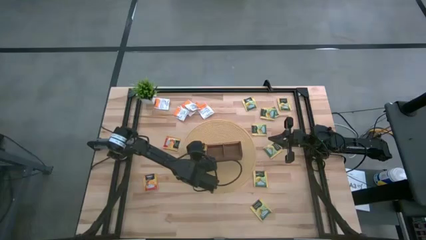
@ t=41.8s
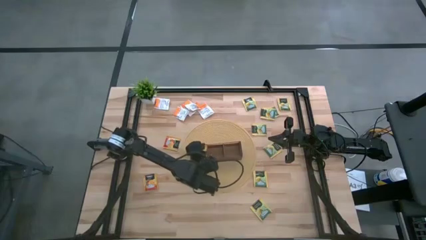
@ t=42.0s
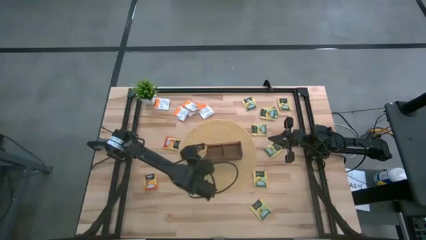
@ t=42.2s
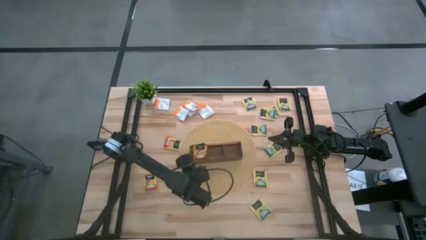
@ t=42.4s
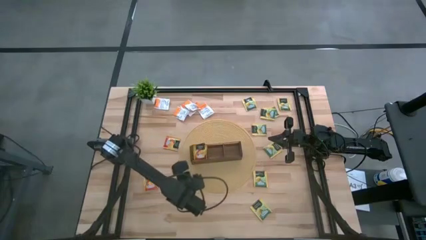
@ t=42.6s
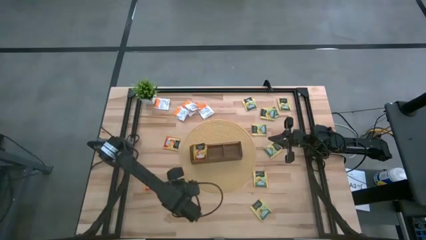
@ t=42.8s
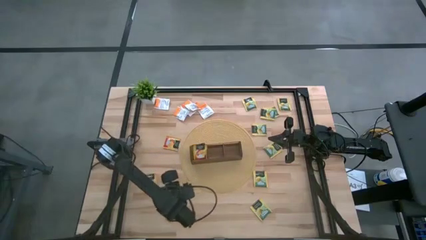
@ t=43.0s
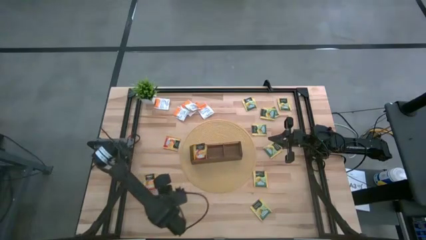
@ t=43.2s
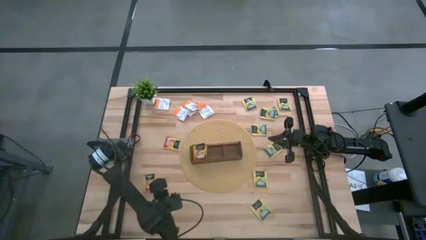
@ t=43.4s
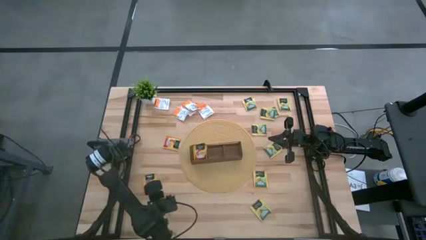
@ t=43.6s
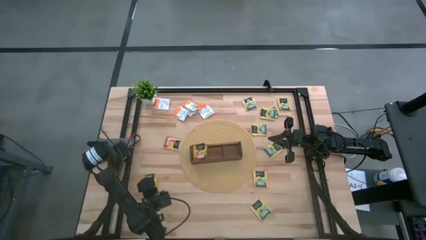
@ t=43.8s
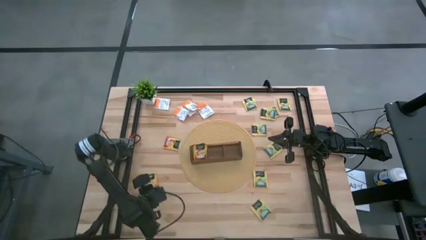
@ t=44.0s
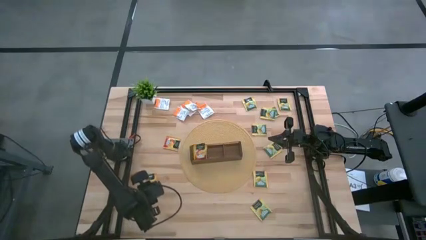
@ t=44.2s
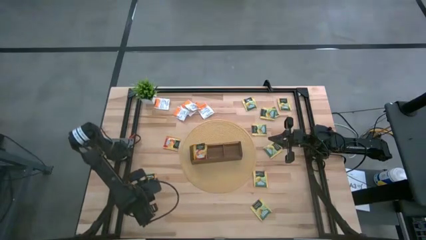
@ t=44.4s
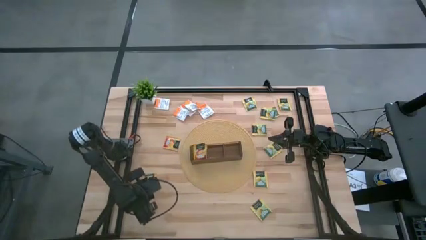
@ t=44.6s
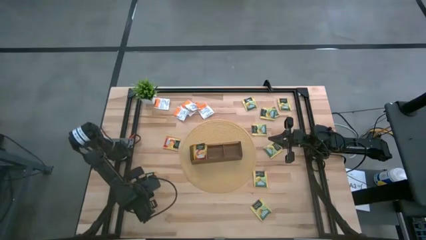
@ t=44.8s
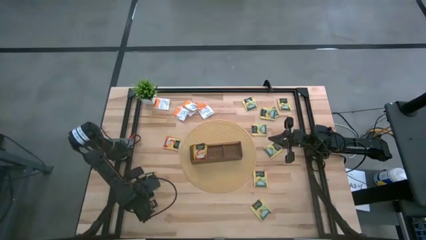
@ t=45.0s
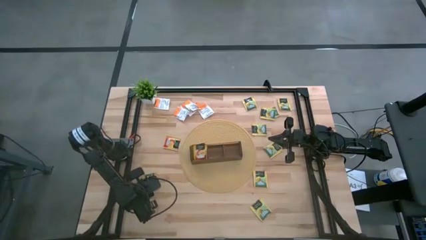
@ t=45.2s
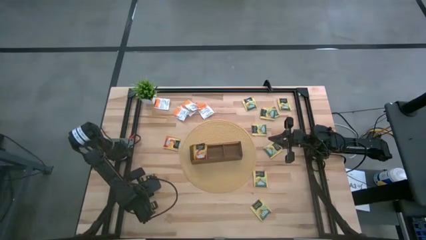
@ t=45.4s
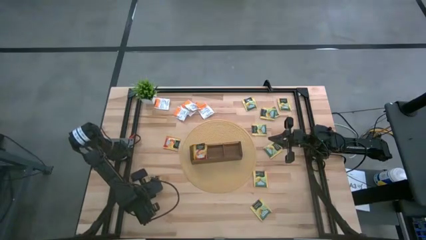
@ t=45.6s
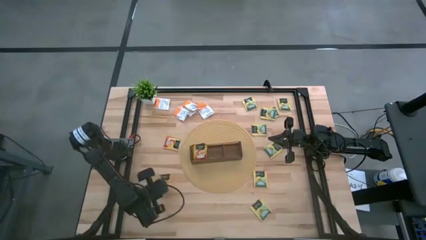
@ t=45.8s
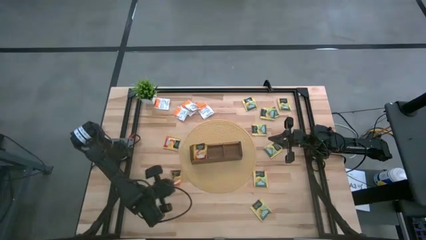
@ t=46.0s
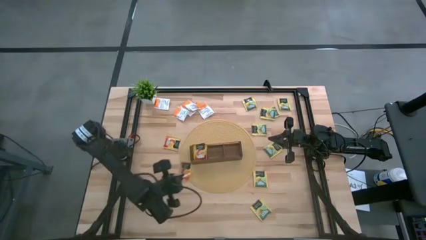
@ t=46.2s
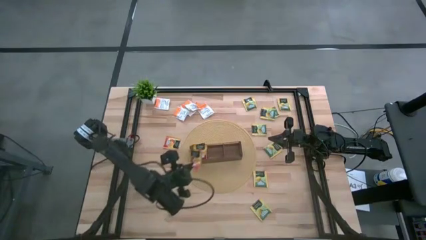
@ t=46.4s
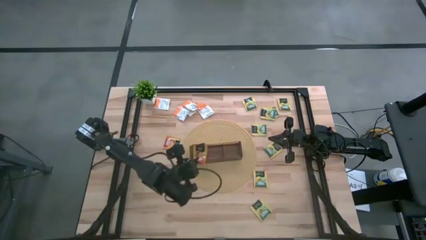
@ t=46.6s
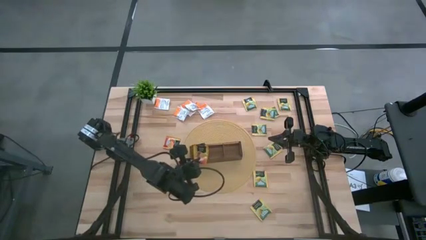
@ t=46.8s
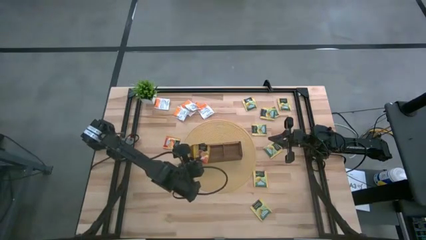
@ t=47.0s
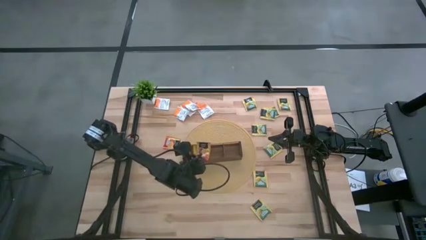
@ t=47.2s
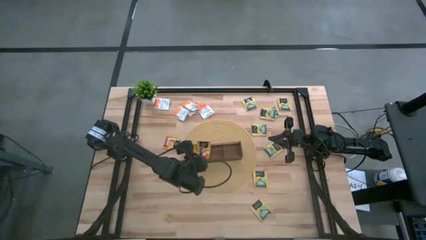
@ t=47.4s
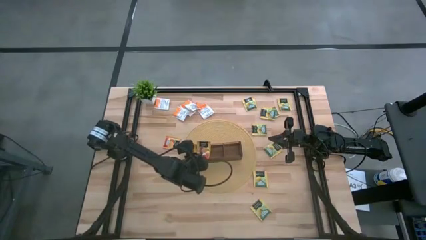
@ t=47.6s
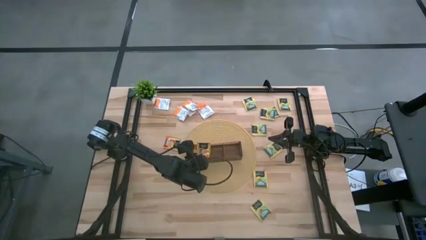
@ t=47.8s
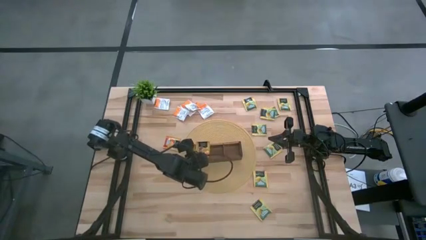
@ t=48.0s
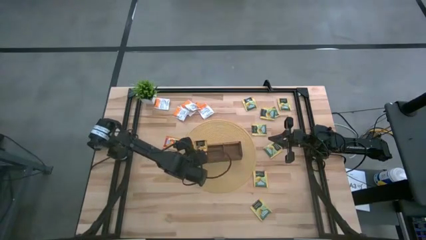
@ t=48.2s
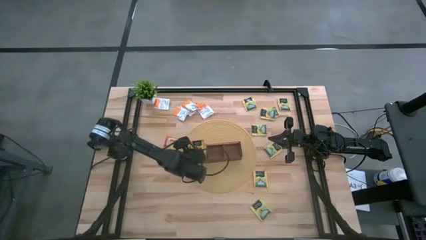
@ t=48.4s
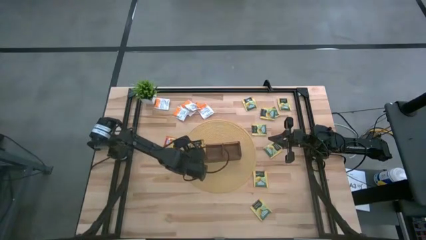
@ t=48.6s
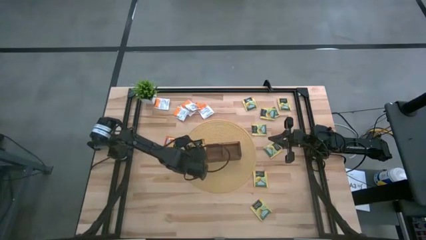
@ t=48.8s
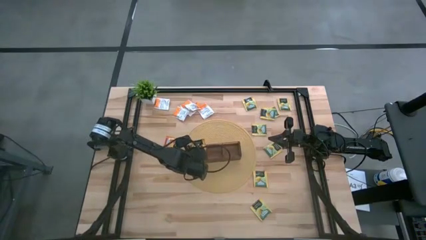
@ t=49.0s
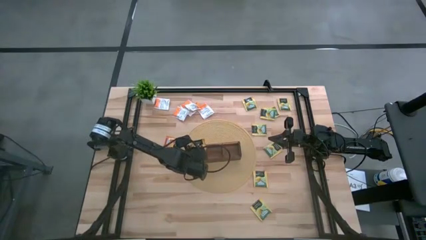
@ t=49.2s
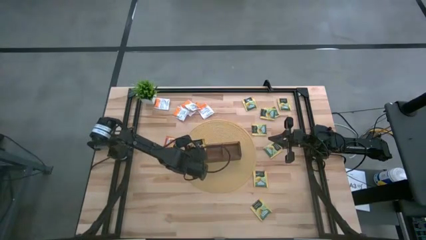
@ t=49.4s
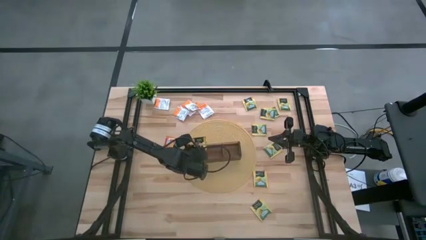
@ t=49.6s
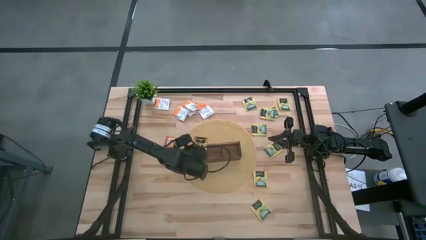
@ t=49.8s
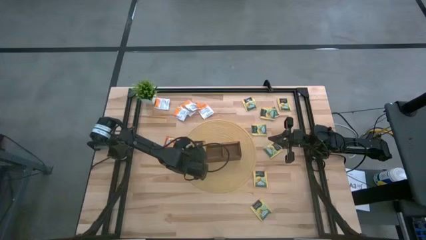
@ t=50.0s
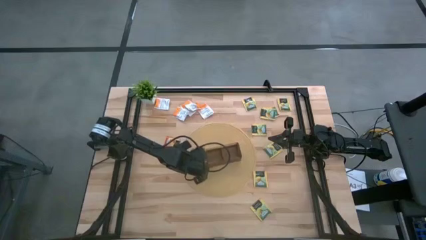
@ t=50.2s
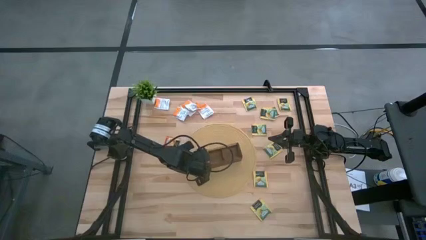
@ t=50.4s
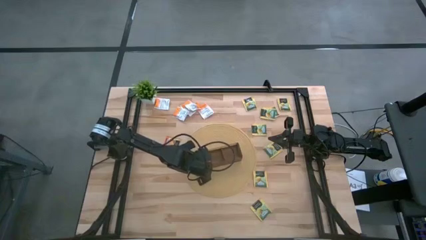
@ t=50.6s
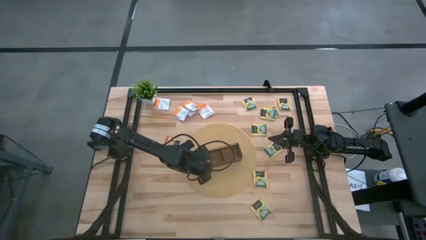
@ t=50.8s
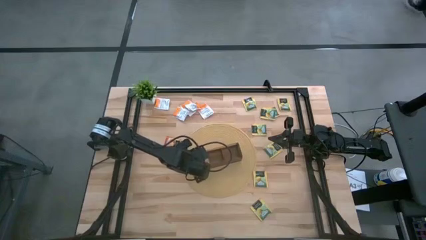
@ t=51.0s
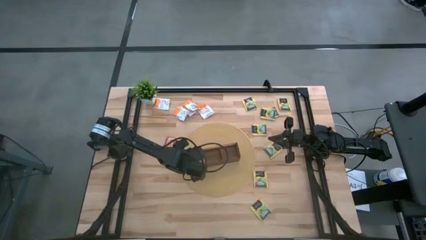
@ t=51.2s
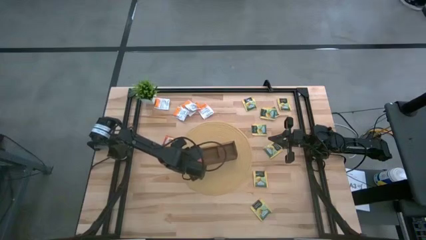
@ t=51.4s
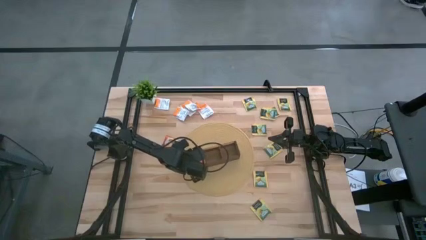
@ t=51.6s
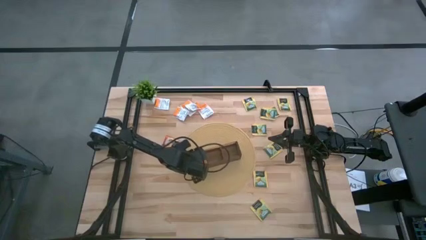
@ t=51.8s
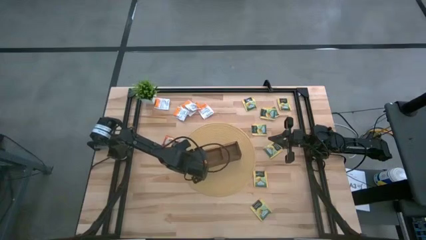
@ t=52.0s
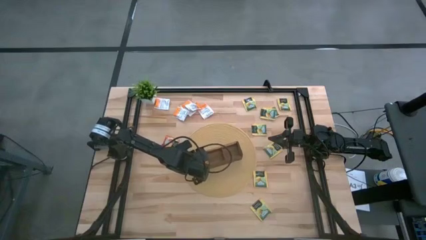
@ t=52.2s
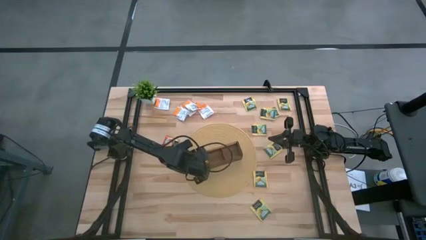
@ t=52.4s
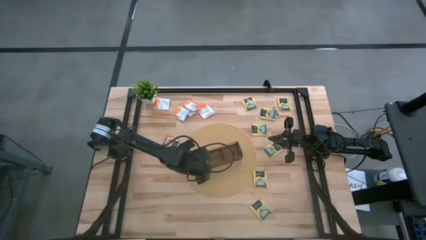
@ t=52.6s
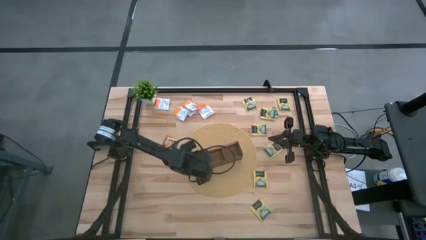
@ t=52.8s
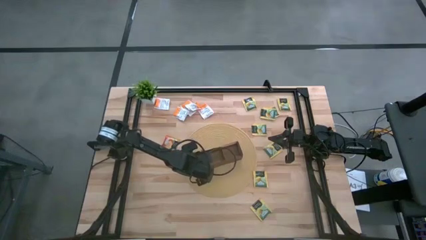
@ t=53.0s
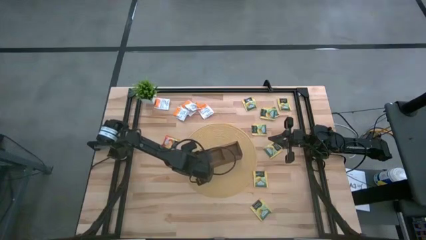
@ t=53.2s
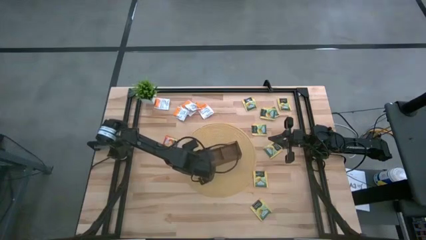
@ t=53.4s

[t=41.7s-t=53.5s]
Task: Pick & Place Tea
Put the bottom mango tea sachet into the left section of the wooden organizer
